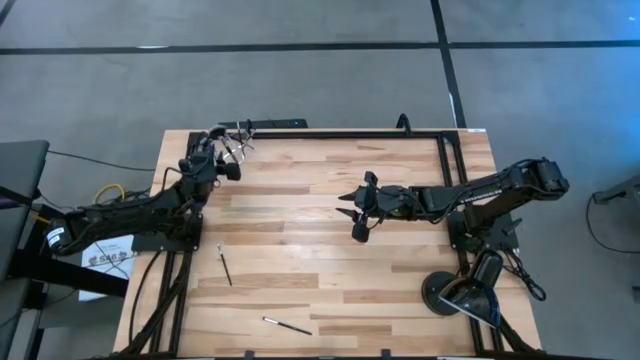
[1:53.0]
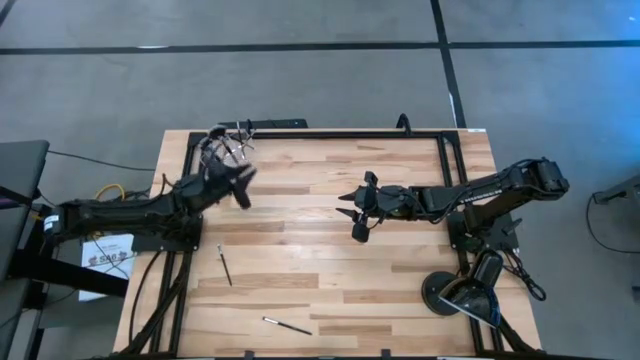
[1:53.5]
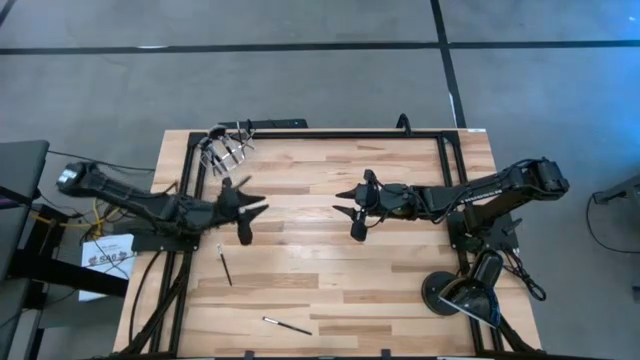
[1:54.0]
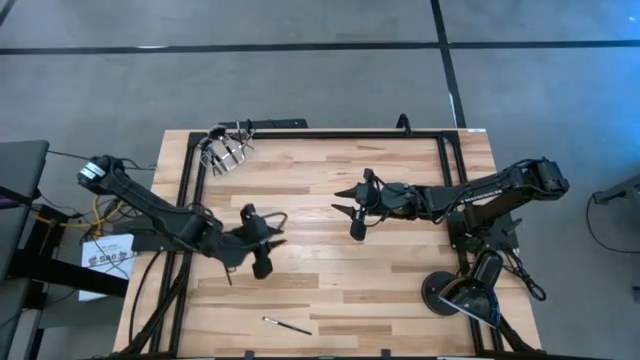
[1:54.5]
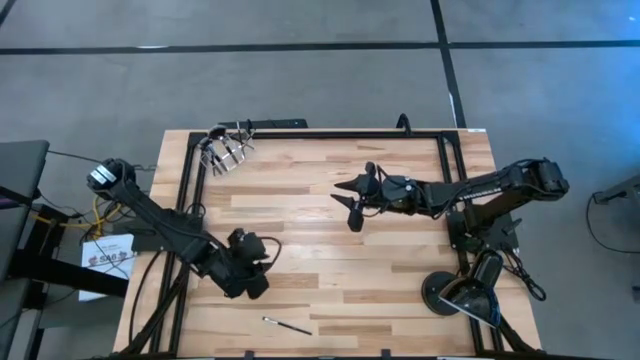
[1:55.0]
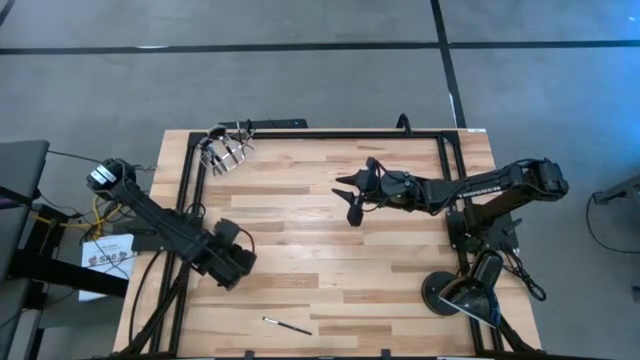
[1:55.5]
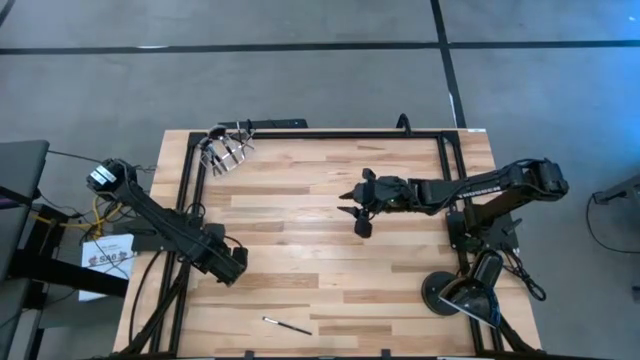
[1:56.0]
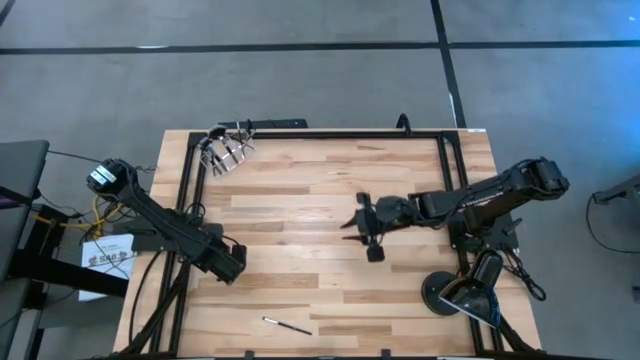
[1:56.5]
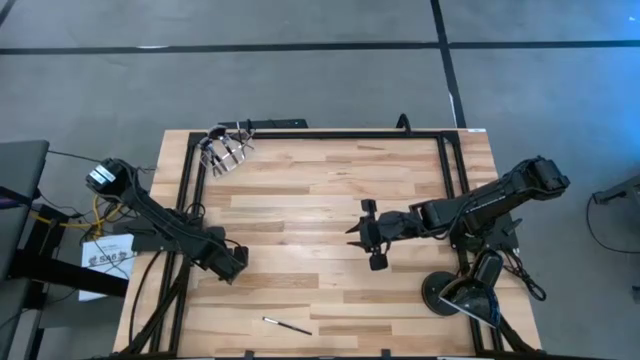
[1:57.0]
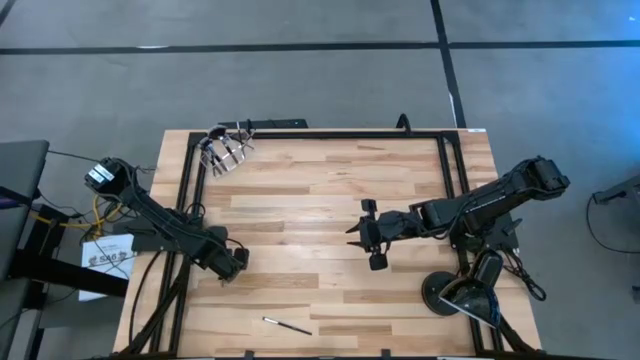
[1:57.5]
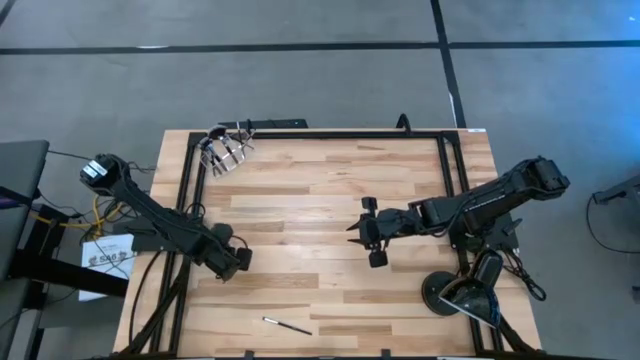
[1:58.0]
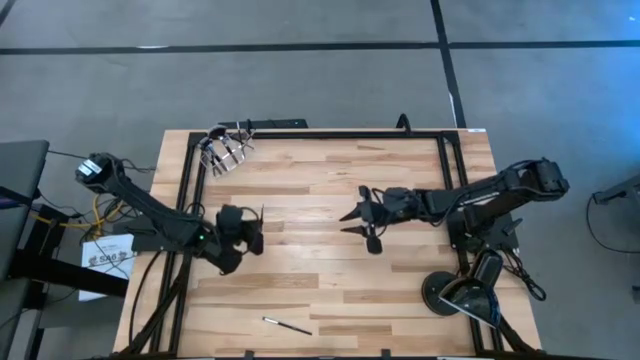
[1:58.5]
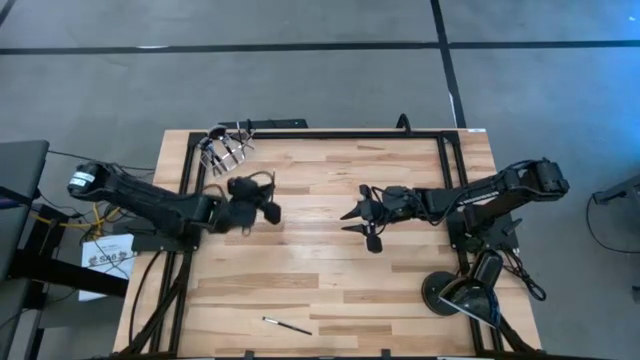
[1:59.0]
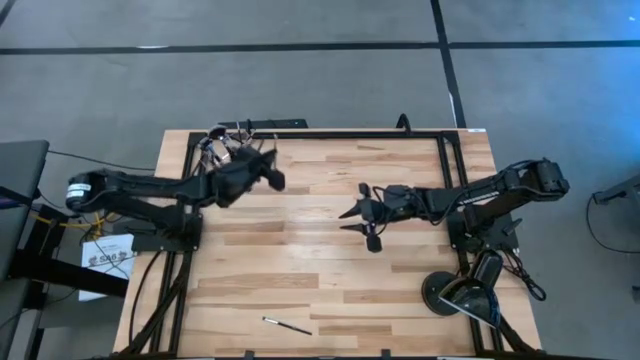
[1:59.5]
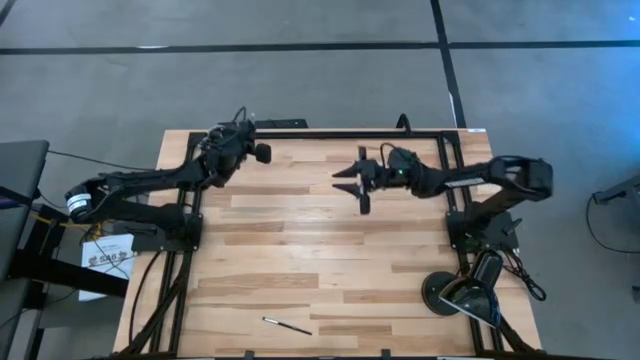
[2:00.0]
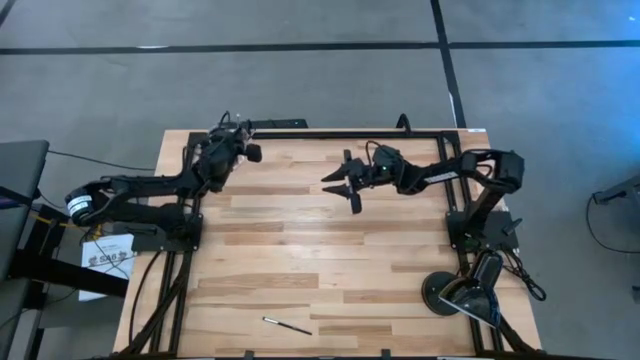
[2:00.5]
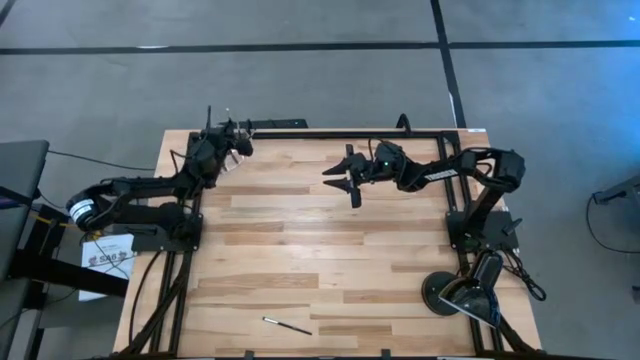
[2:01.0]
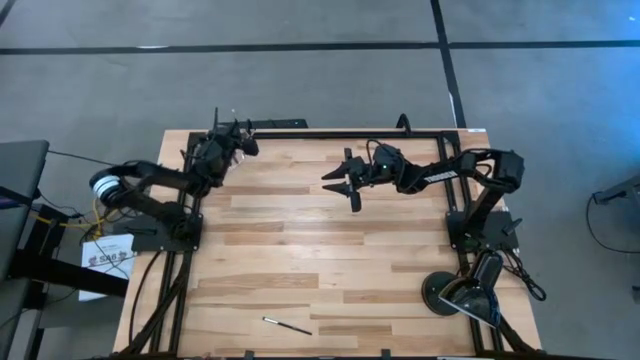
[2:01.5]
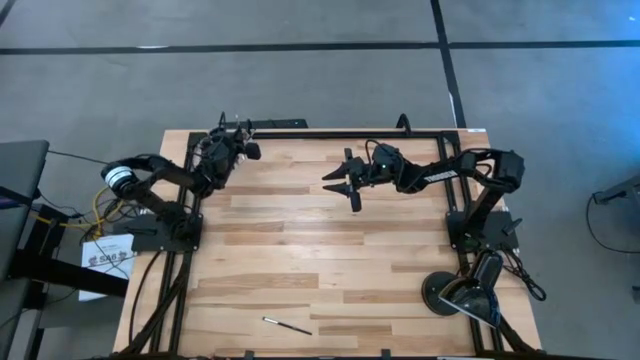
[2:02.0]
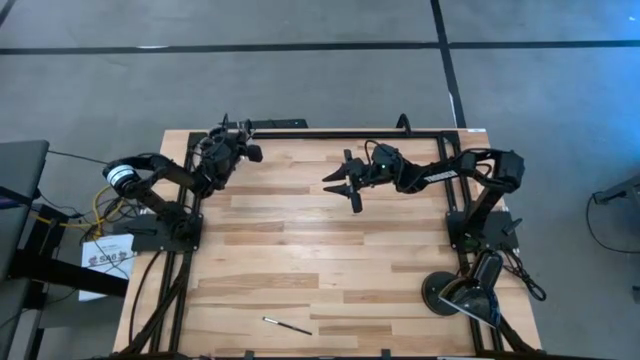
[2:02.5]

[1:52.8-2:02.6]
Task: Put items in baskets/containers
Put the eyeshadow brush into the transparent bin

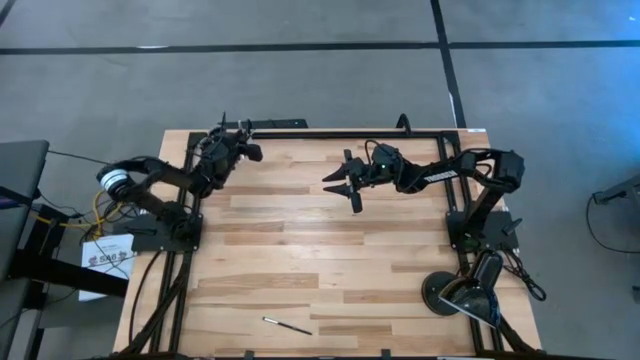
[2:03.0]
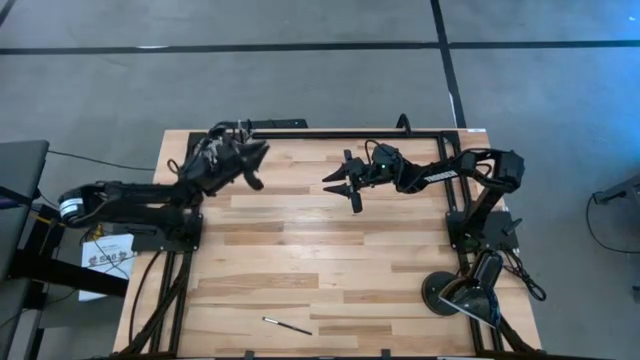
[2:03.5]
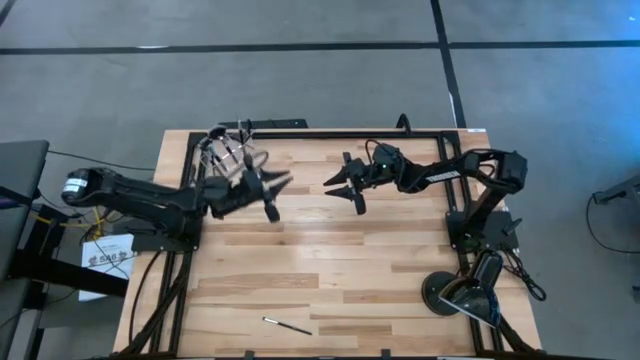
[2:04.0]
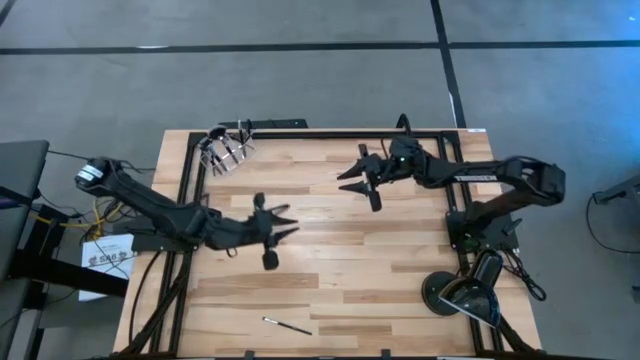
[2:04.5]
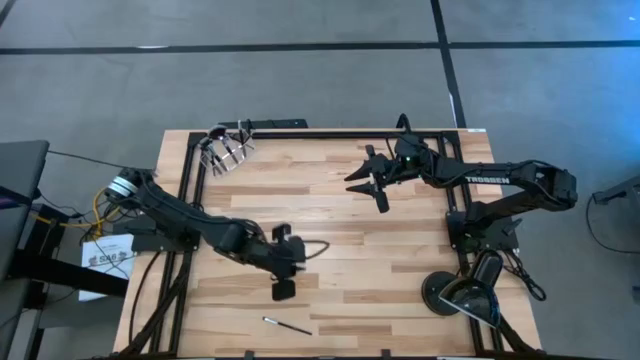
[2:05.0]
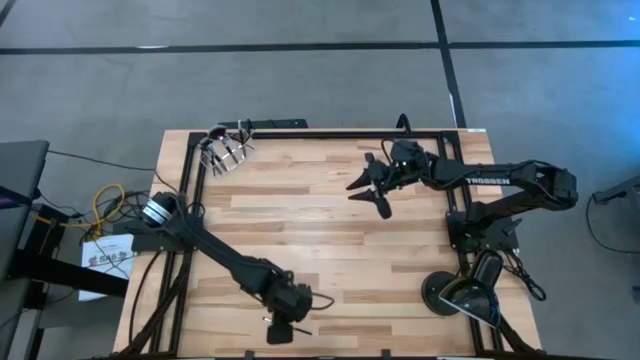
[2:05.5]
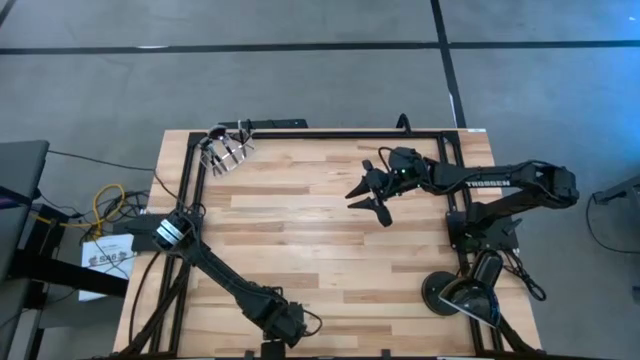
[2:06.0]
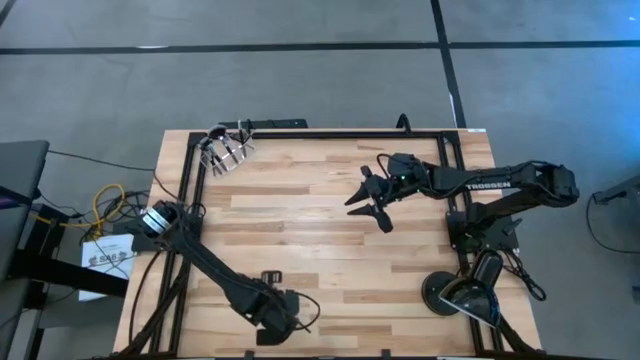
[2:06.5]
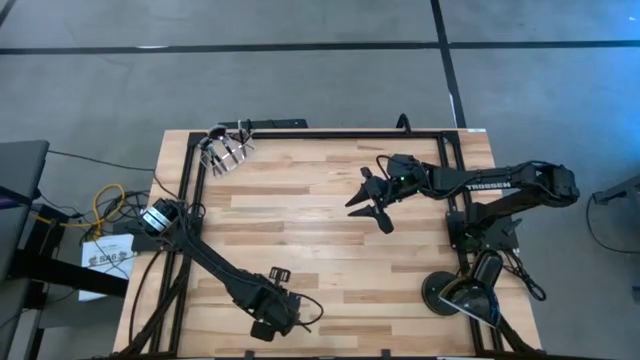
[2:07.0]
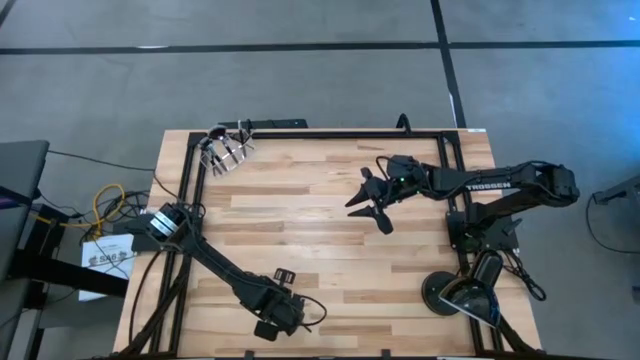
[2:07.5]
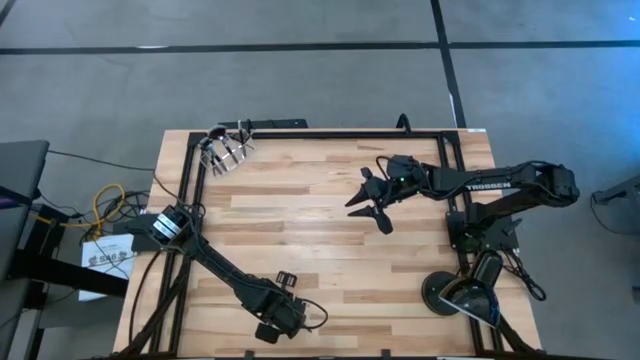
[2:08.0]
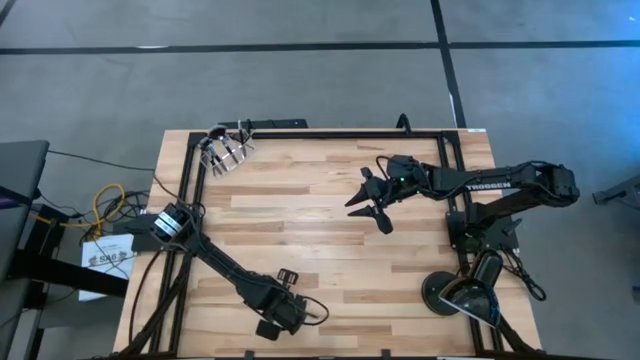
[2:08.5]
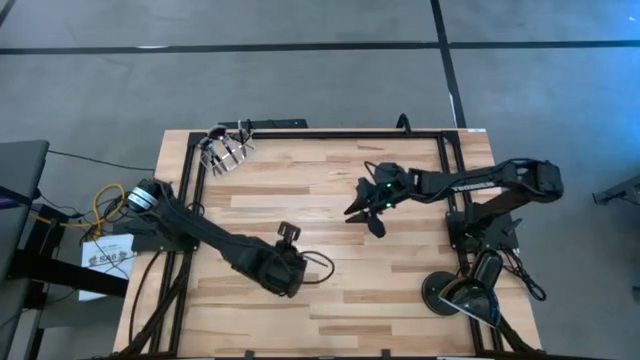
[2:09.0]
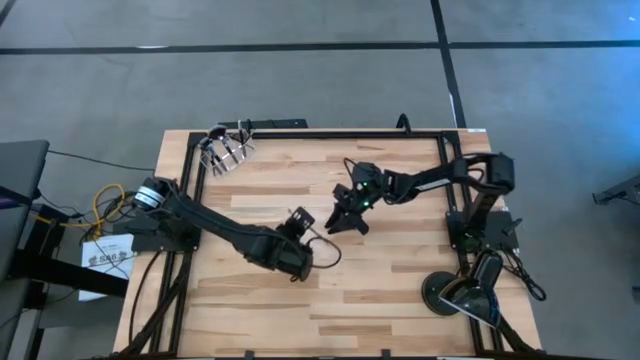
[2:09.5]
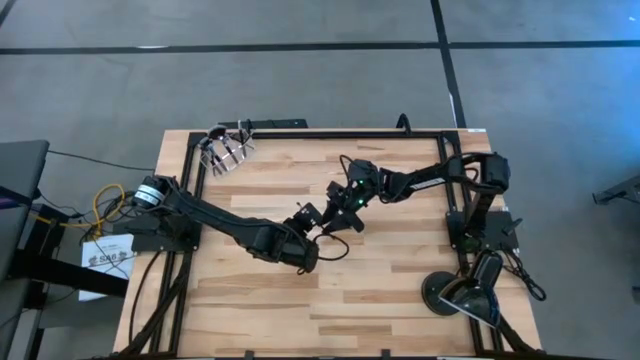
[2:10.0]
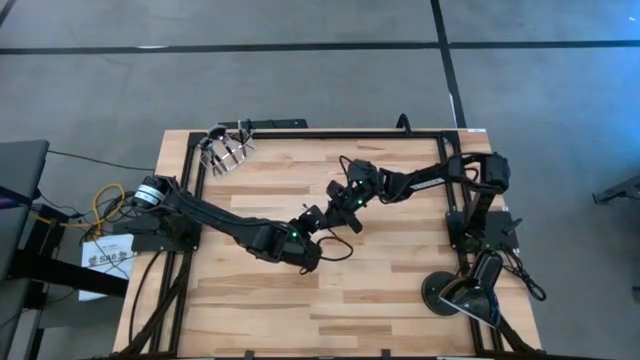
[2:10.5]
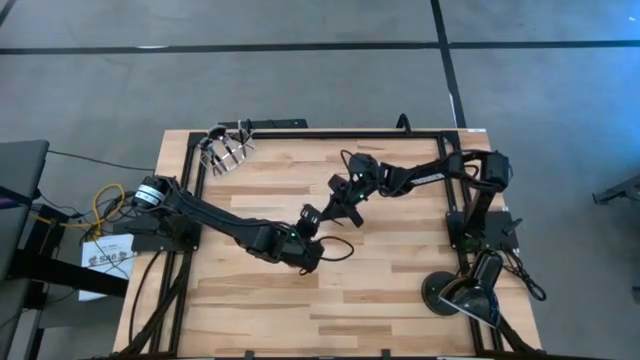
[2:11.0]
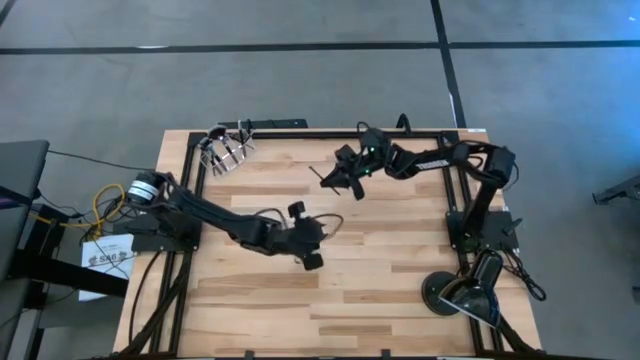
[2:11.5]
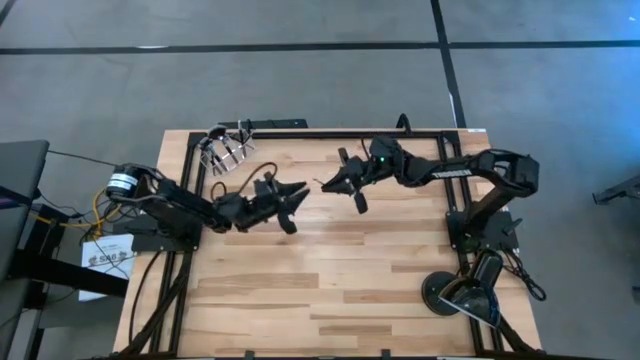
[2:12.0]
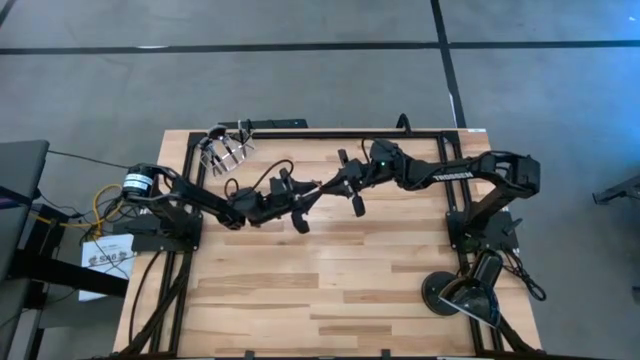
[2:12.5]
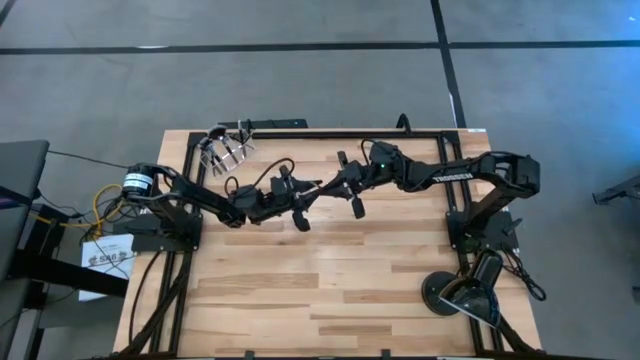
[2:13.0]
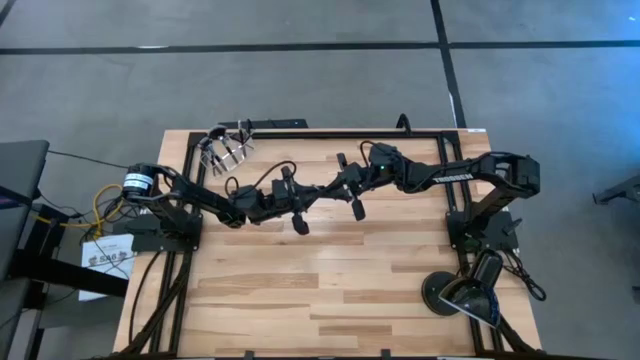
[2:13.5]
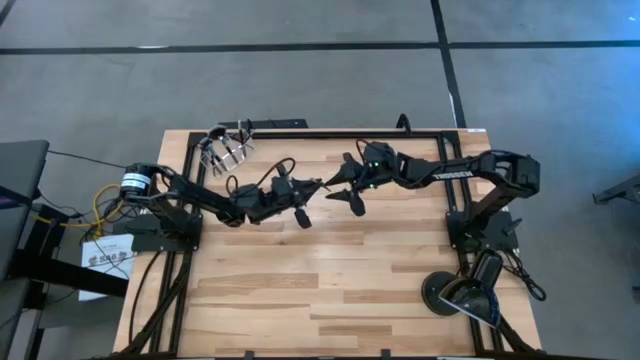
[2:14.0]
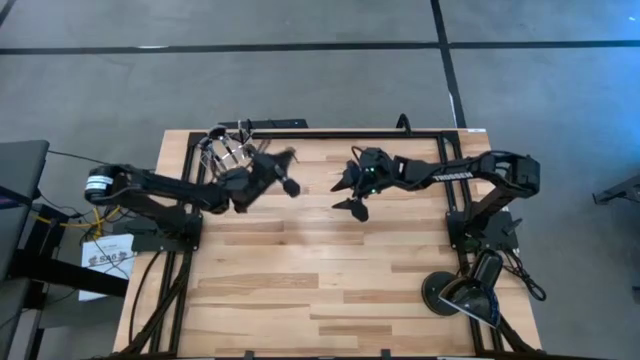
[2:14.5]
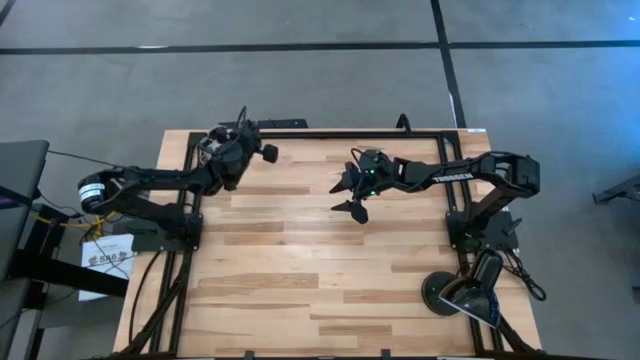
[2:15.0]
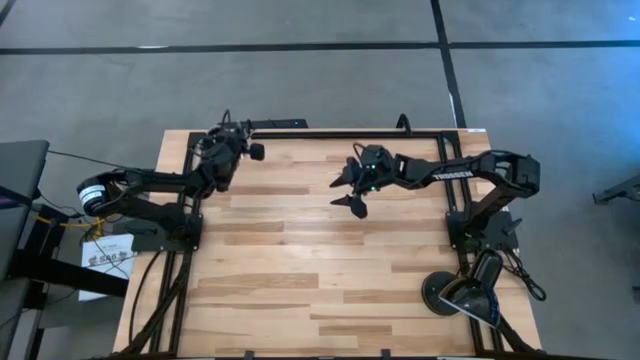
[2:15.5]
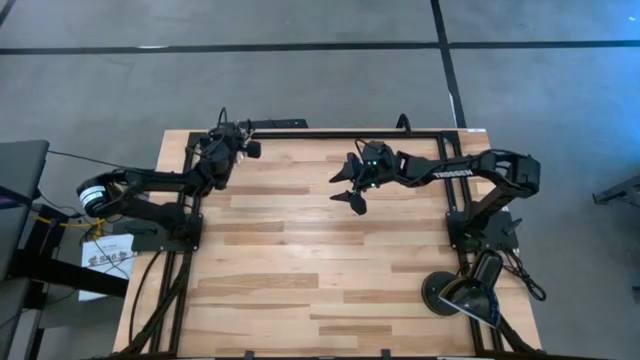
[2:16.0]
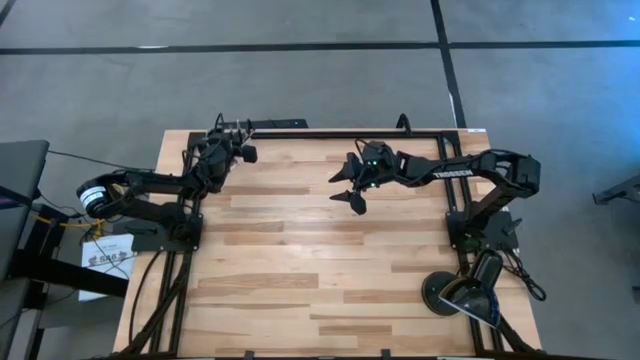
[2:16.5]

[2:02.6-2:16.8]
Put the eyeshadow brush into the transparent bin
